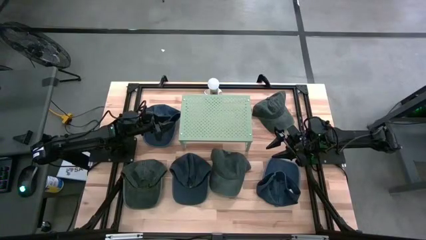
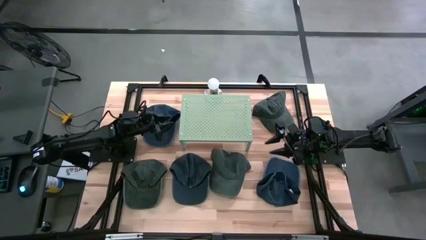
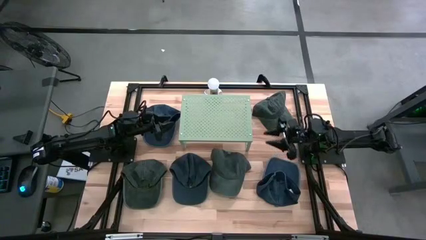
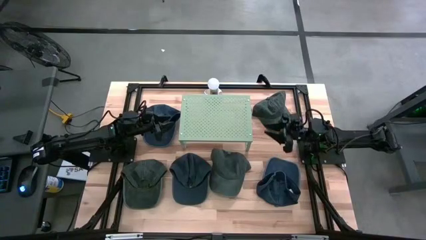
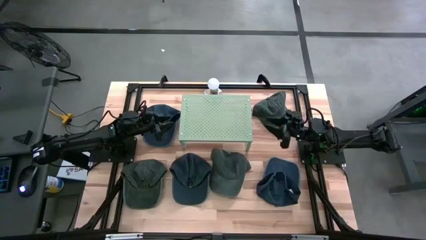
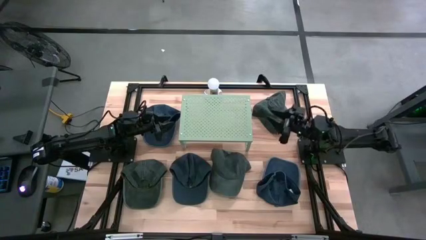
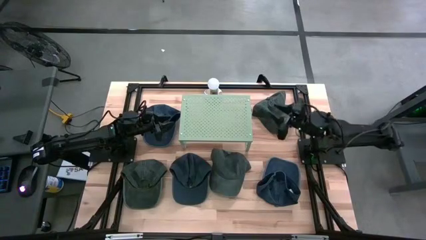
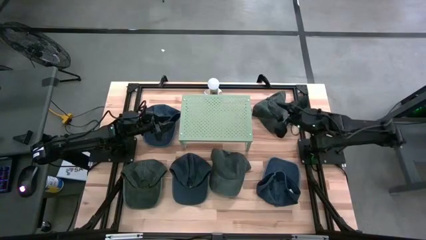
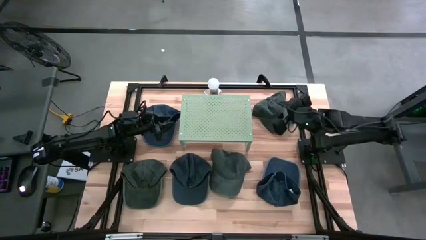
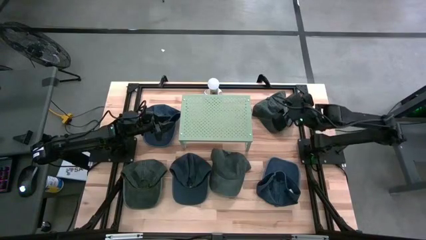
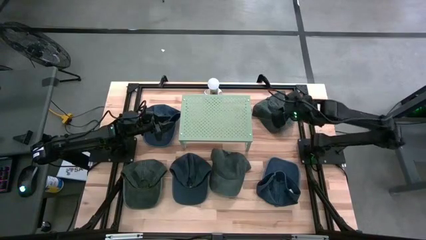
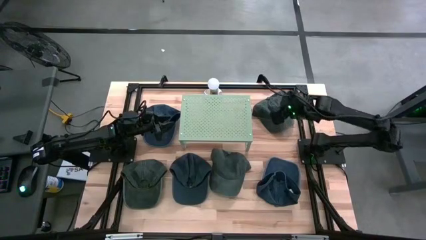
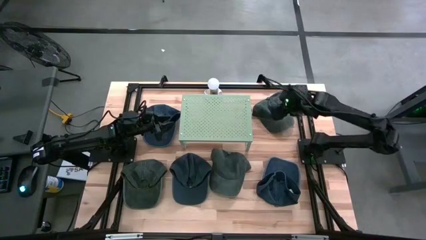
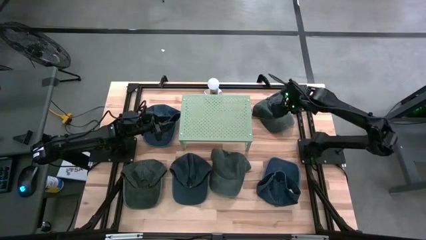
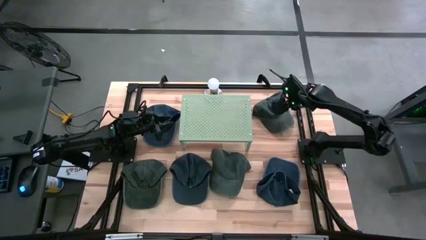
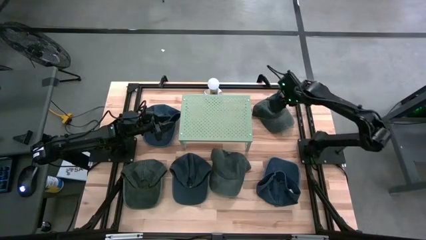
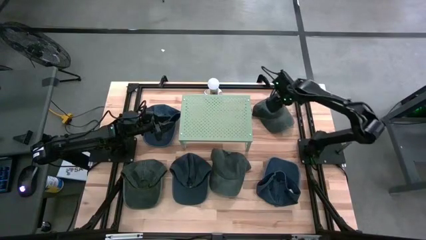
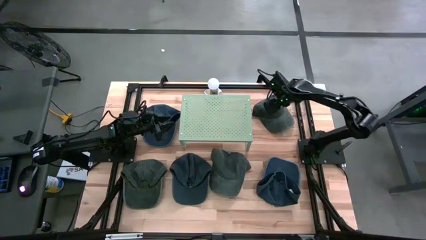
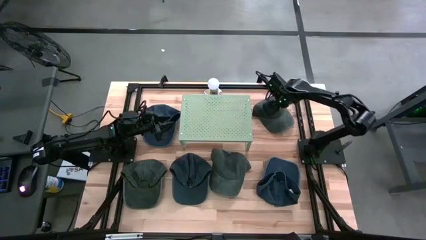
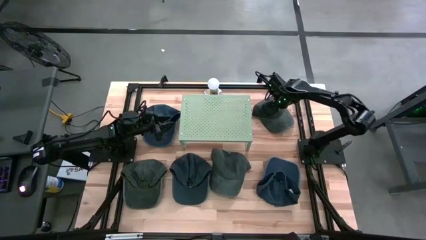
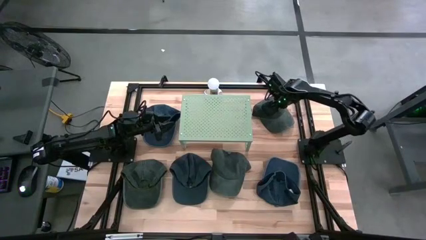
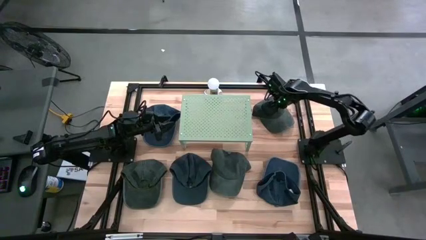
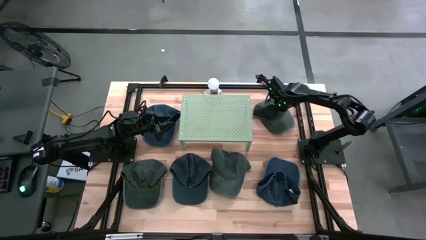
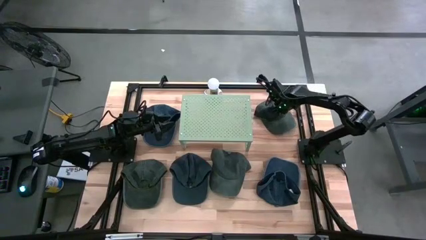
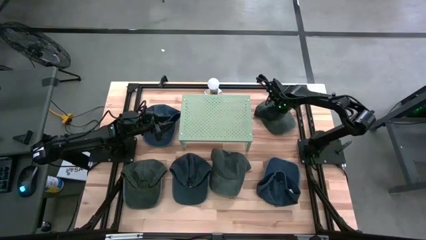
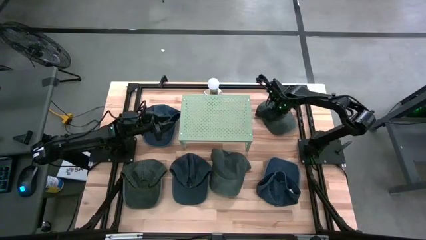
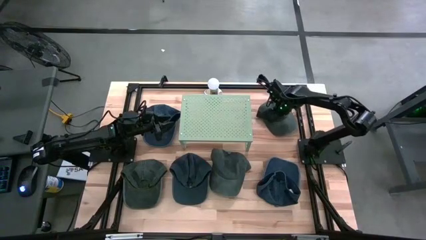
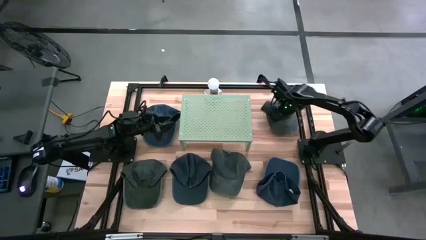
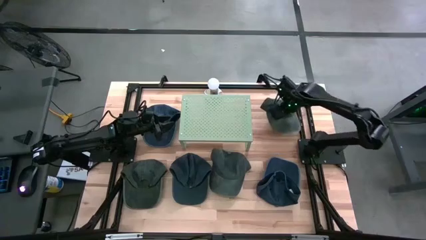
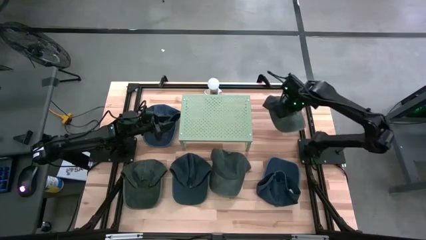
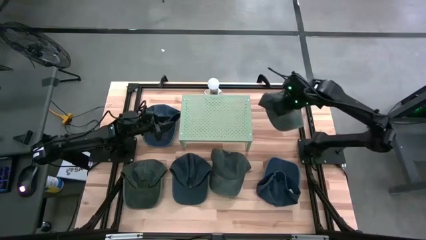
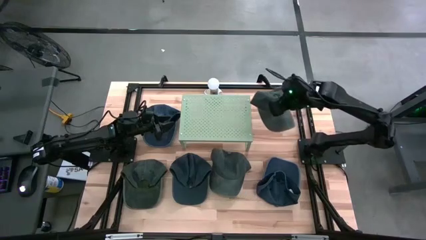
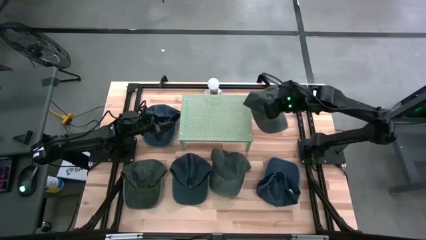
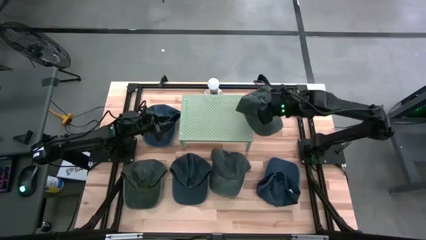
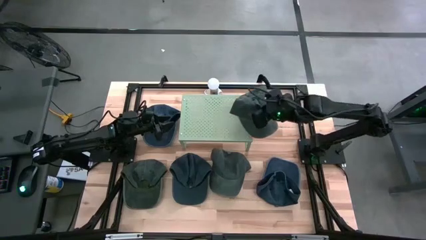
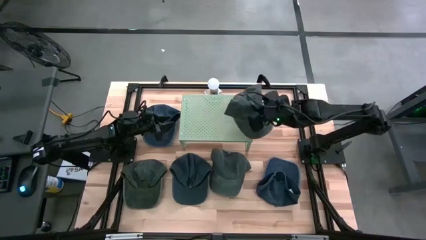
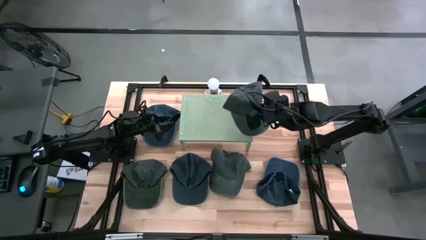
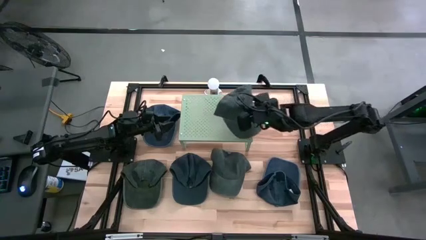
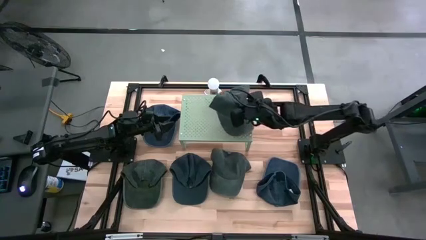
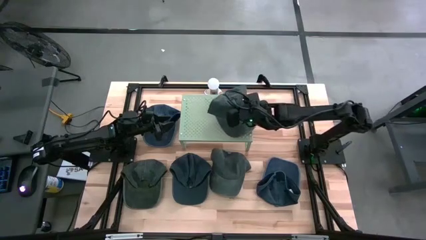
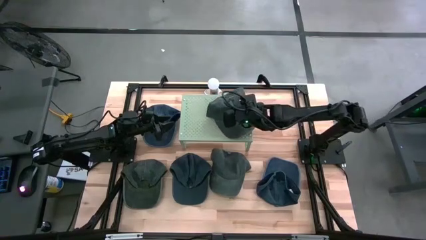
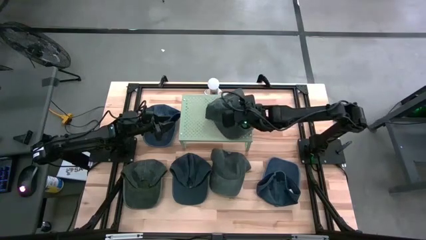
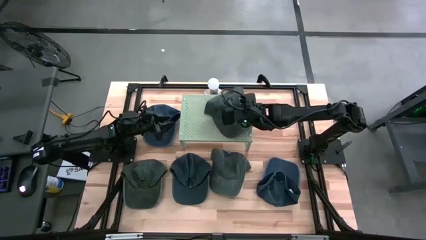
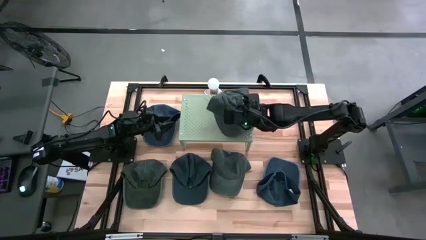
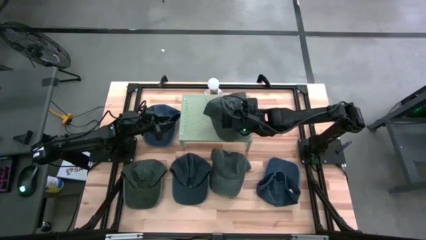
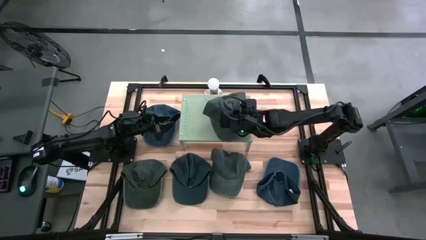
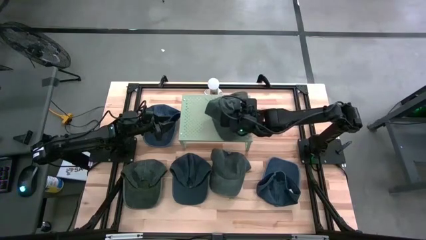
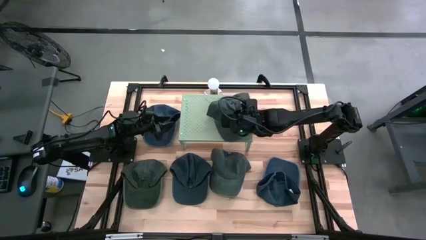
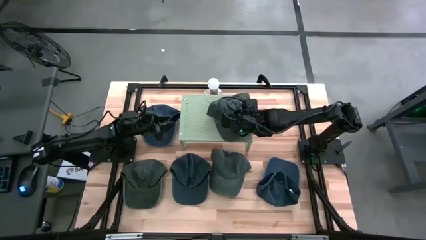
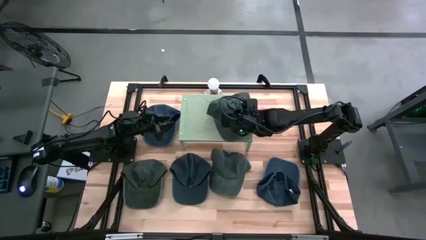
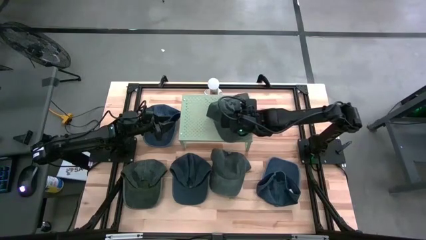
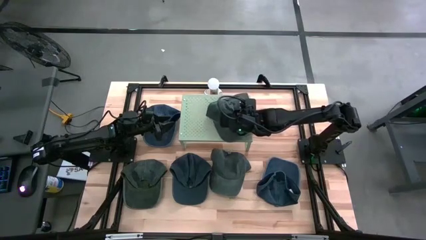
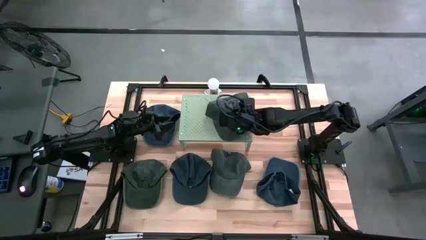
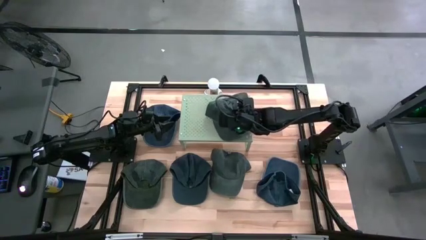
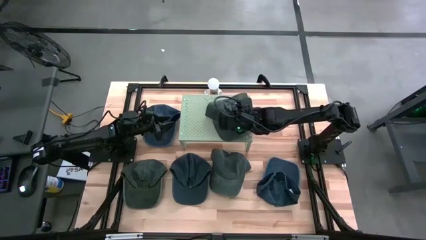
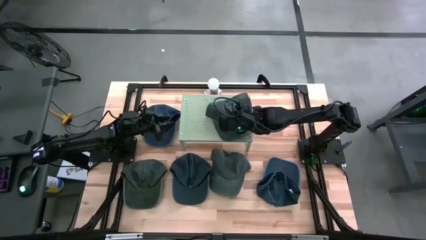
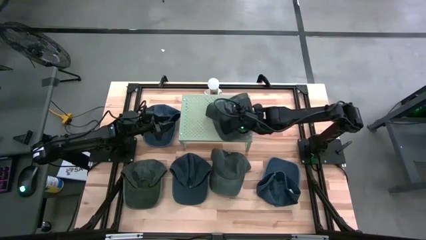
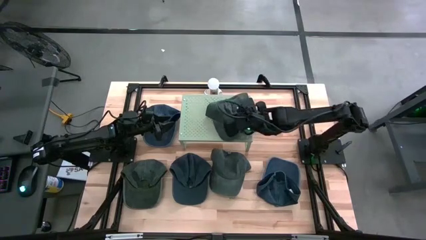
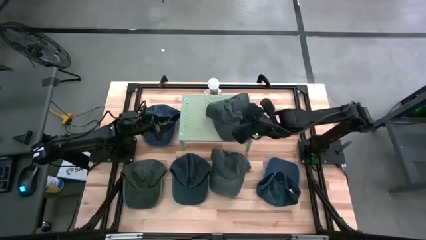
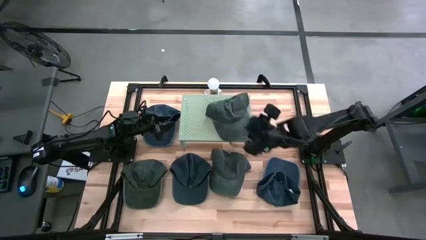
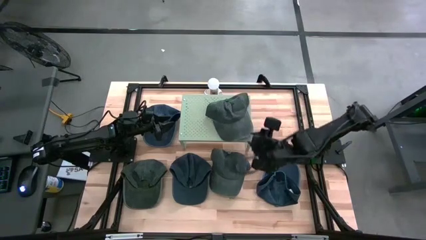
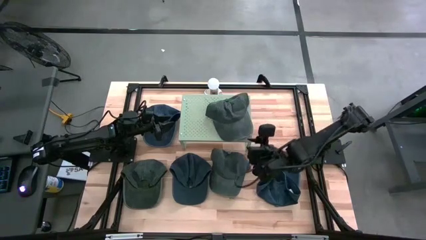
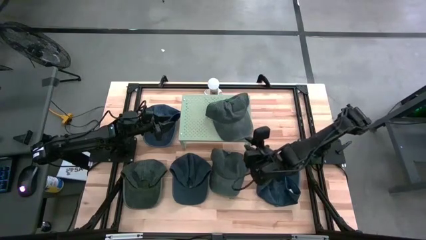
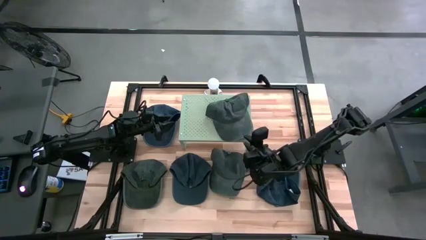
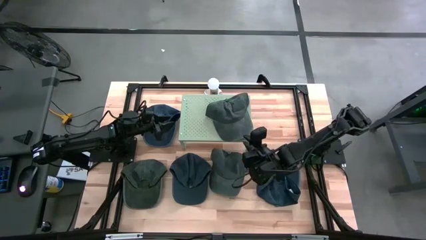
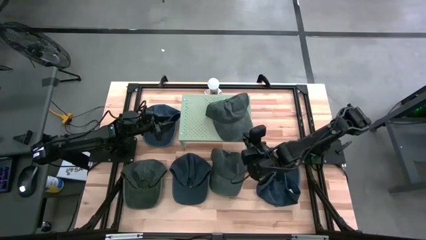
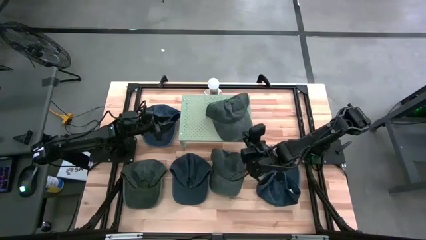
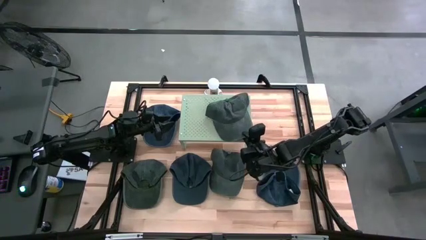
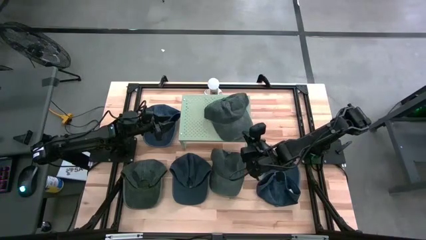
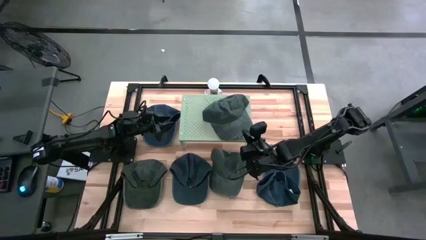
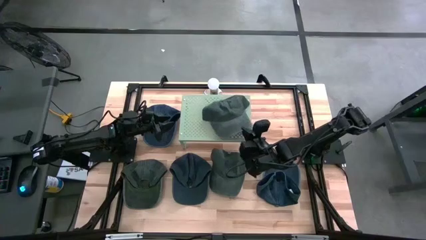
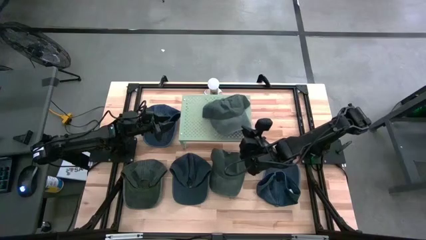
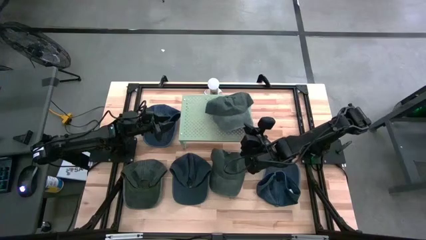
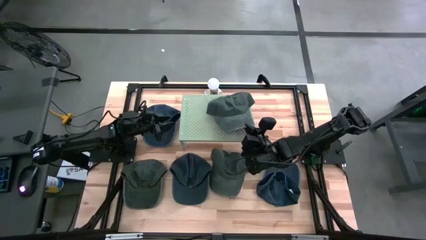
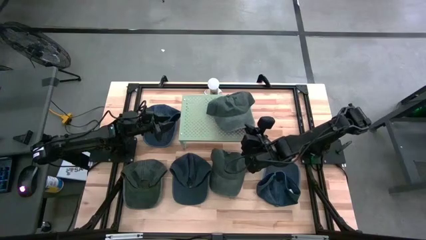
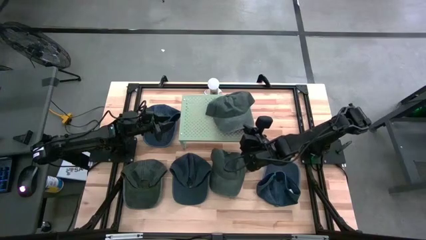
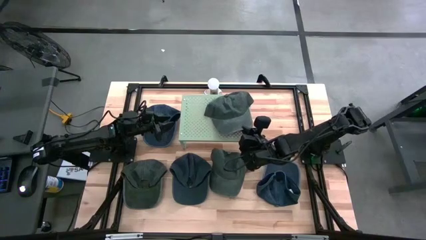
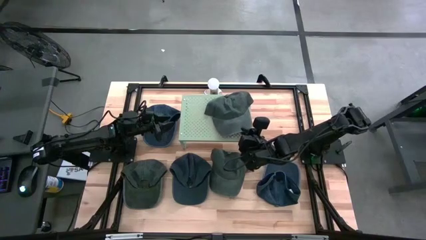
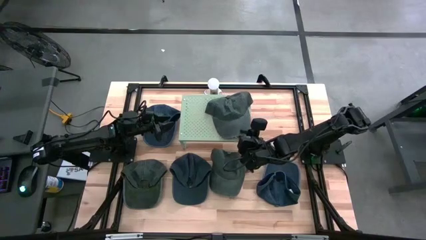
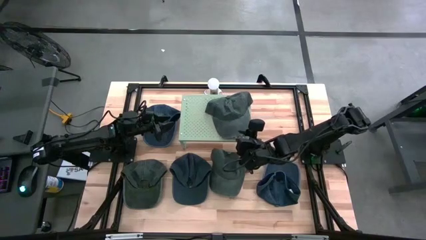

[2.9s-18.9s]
Task: Pick & Place hat
Put the top right gray cap on the shelf
